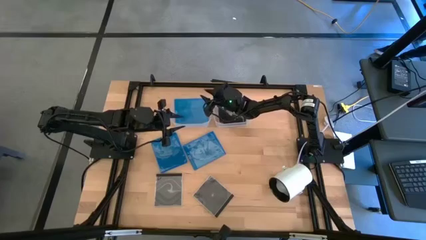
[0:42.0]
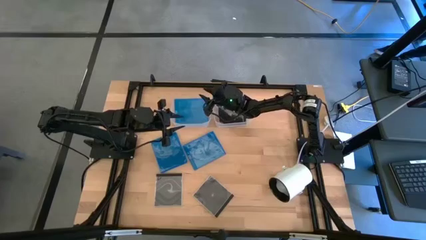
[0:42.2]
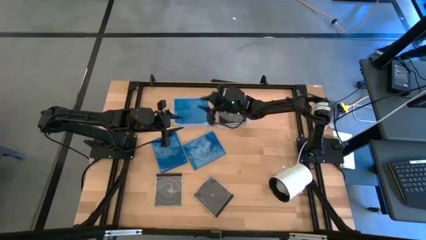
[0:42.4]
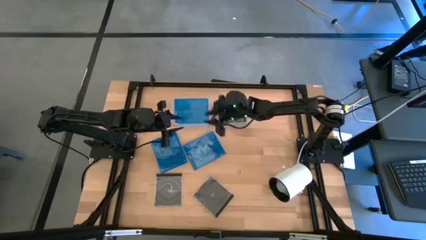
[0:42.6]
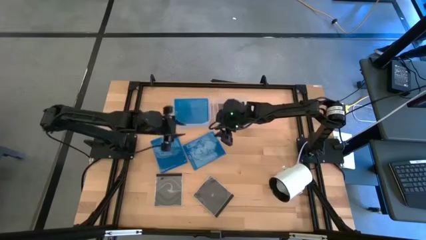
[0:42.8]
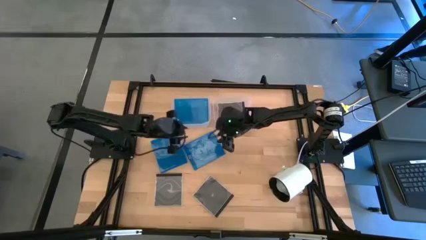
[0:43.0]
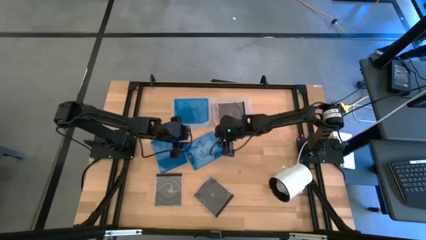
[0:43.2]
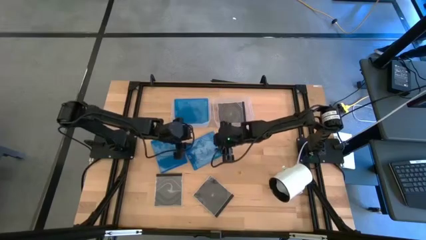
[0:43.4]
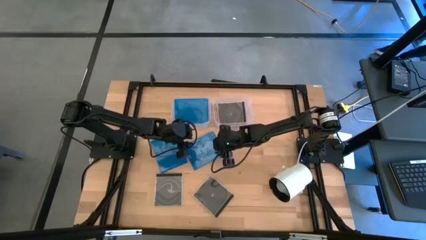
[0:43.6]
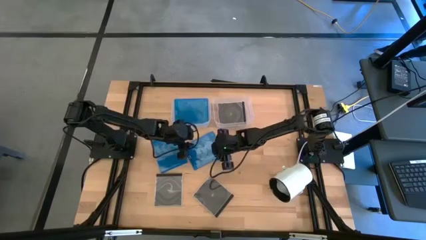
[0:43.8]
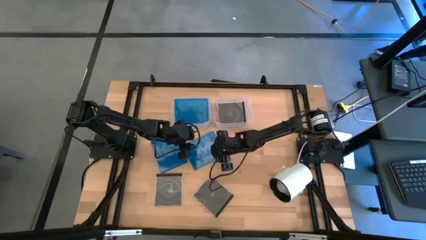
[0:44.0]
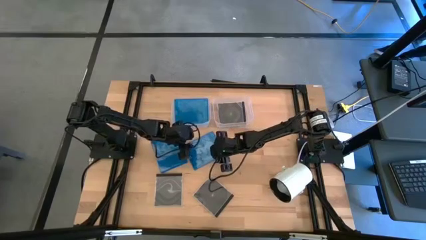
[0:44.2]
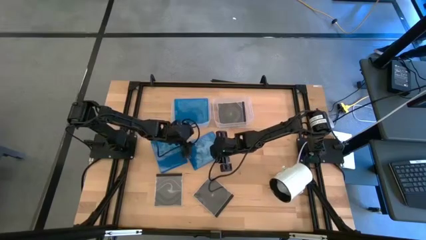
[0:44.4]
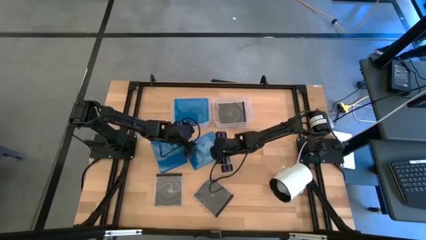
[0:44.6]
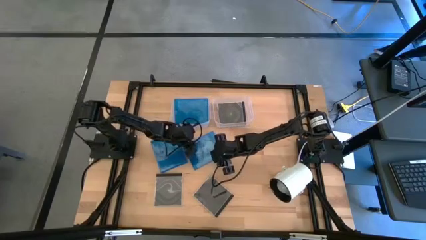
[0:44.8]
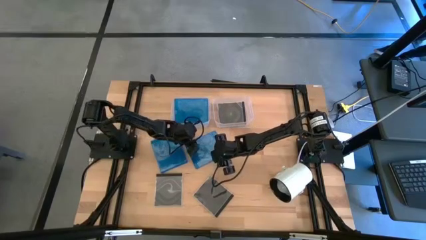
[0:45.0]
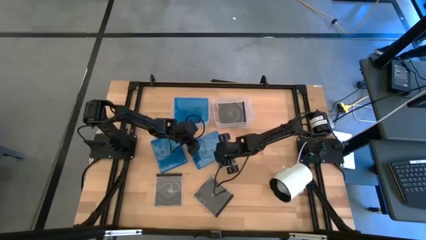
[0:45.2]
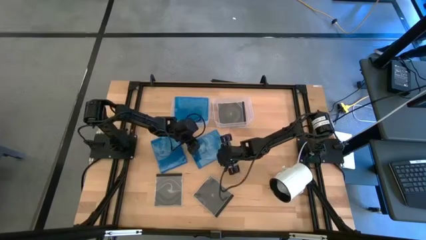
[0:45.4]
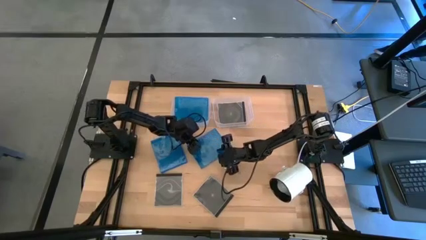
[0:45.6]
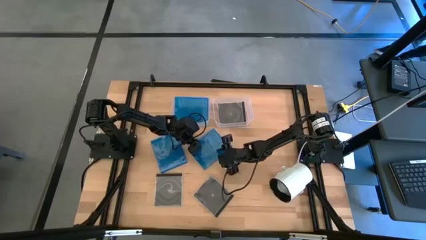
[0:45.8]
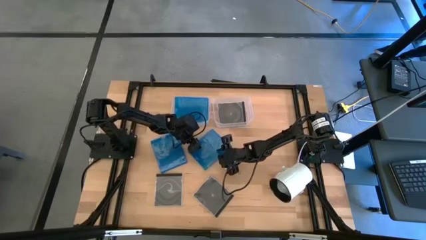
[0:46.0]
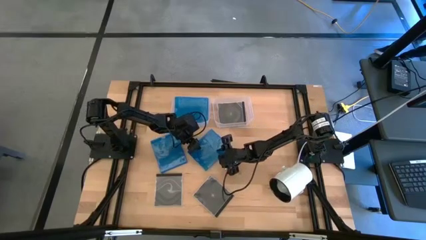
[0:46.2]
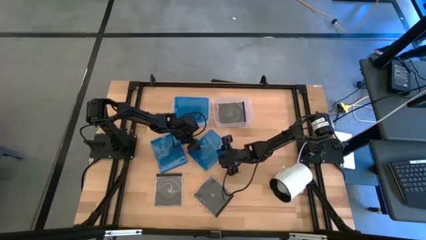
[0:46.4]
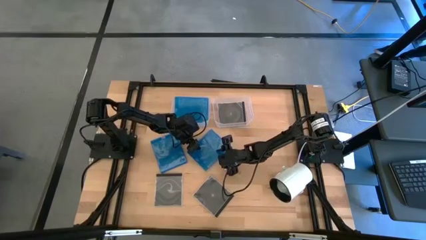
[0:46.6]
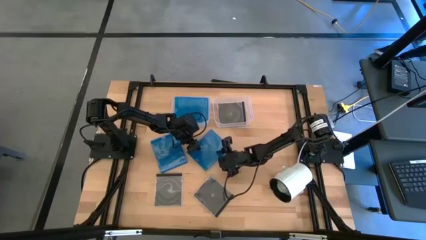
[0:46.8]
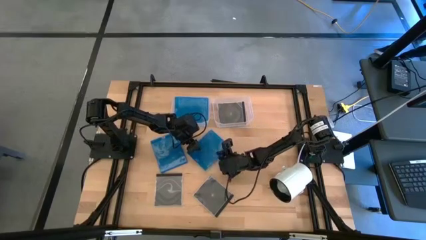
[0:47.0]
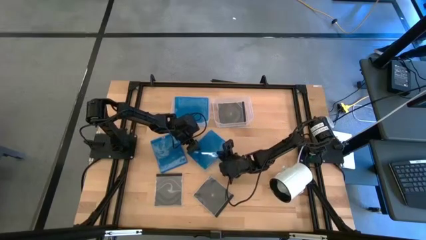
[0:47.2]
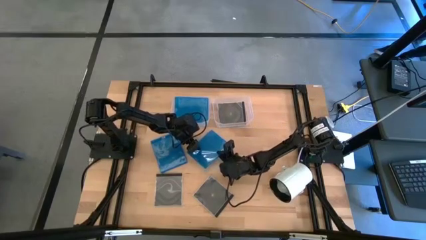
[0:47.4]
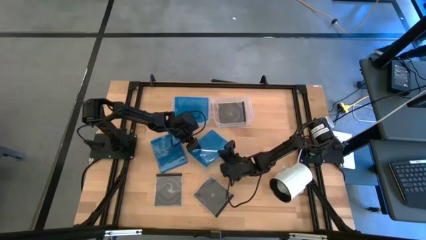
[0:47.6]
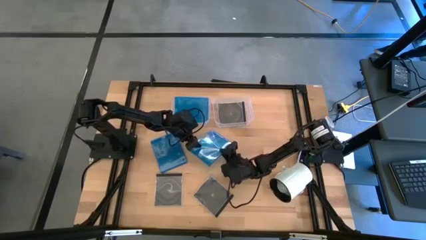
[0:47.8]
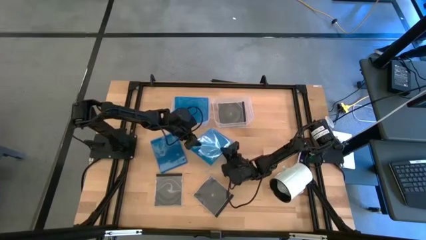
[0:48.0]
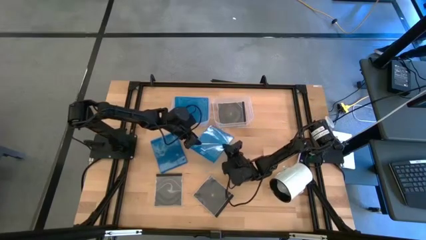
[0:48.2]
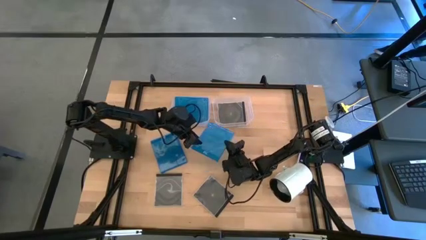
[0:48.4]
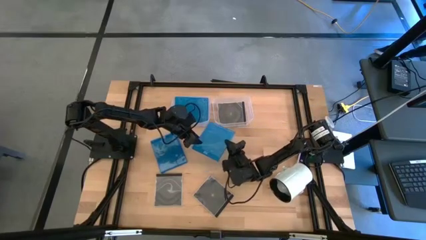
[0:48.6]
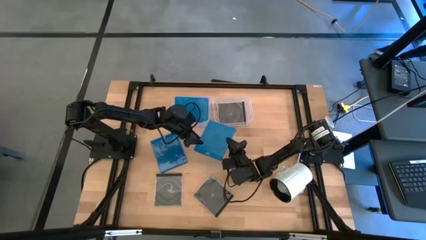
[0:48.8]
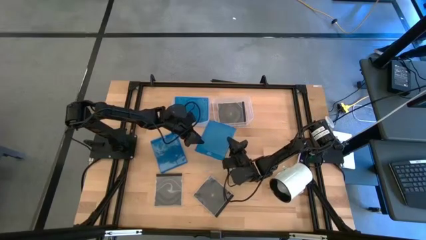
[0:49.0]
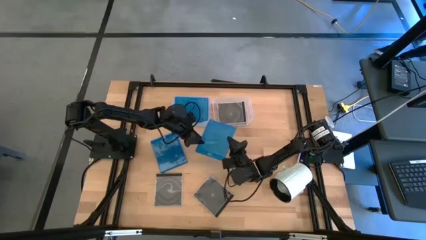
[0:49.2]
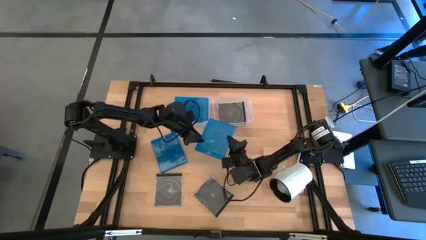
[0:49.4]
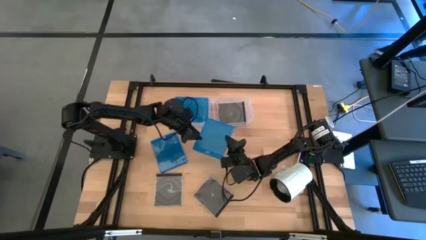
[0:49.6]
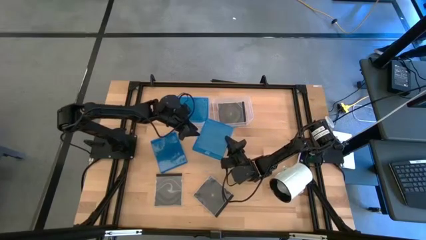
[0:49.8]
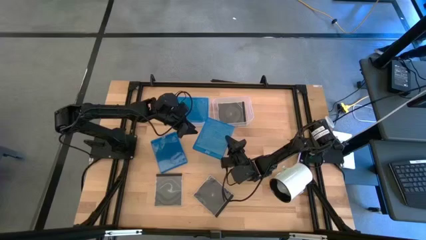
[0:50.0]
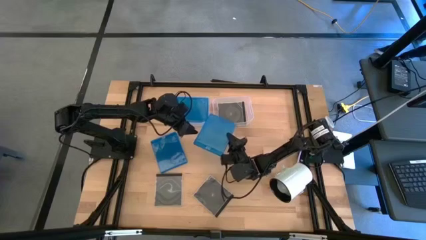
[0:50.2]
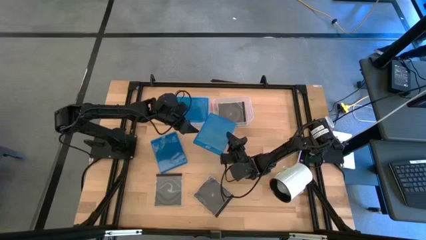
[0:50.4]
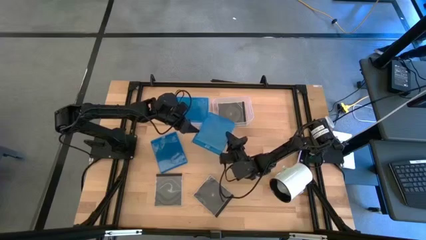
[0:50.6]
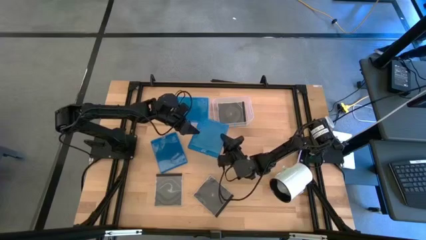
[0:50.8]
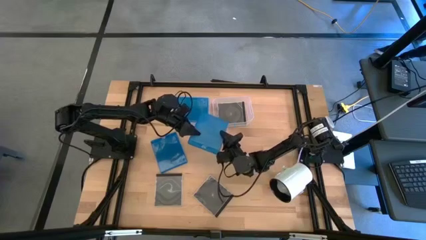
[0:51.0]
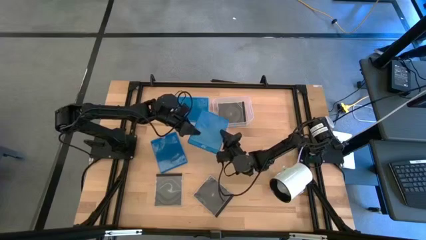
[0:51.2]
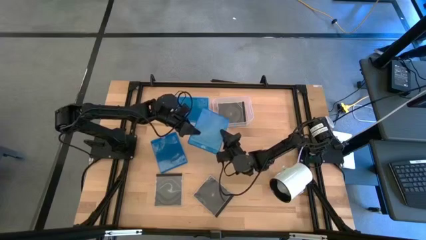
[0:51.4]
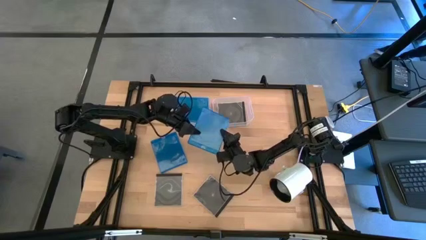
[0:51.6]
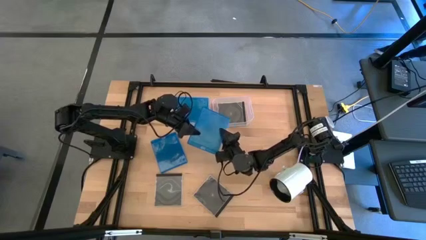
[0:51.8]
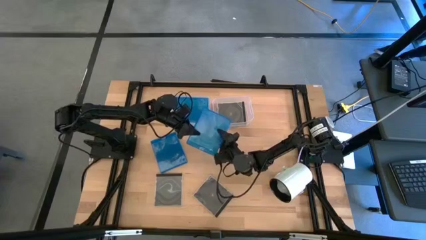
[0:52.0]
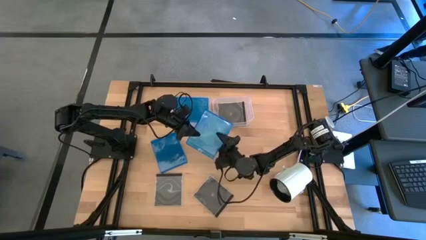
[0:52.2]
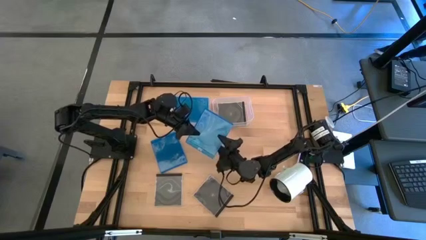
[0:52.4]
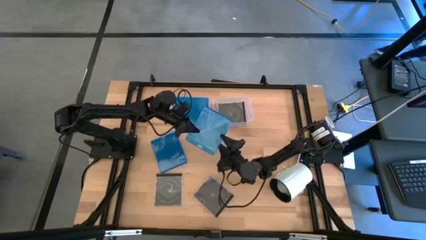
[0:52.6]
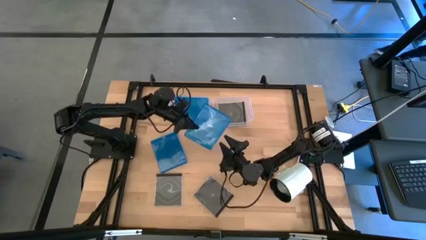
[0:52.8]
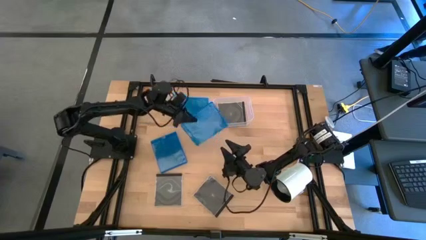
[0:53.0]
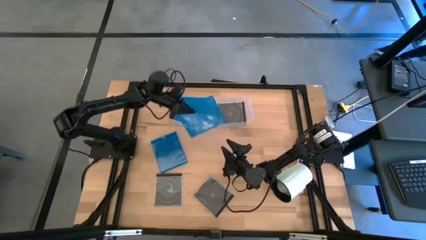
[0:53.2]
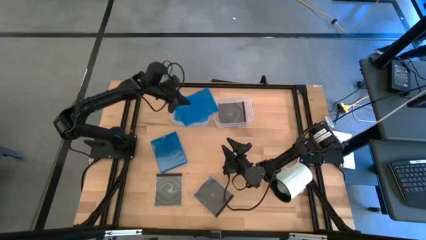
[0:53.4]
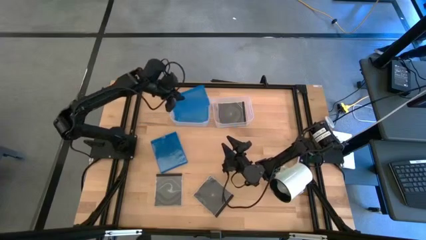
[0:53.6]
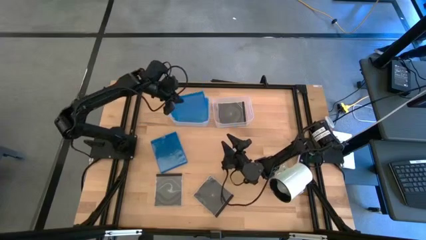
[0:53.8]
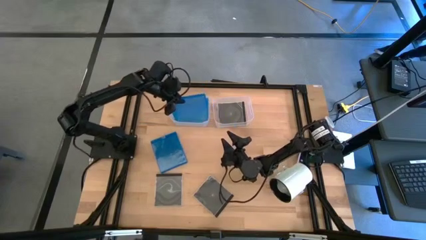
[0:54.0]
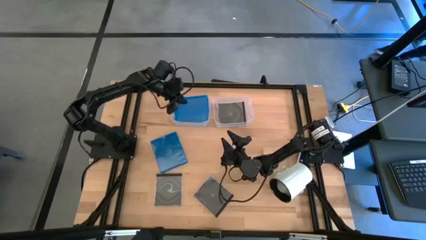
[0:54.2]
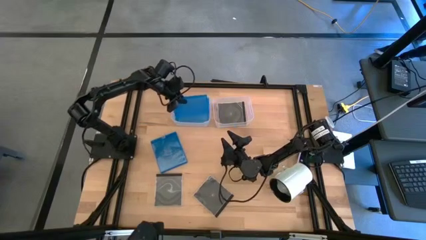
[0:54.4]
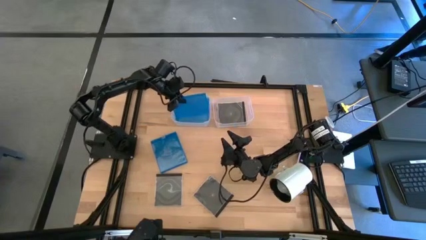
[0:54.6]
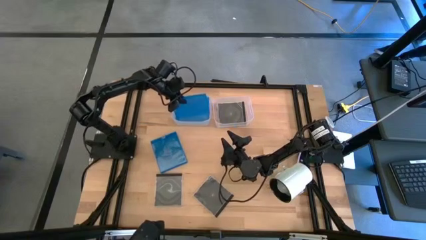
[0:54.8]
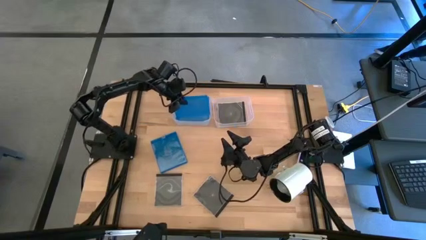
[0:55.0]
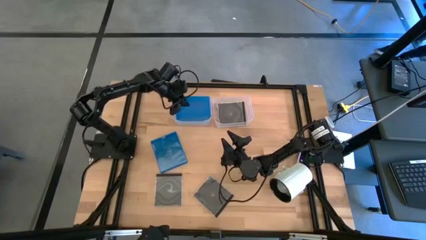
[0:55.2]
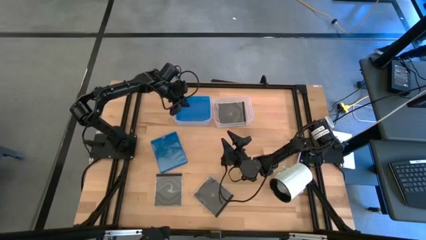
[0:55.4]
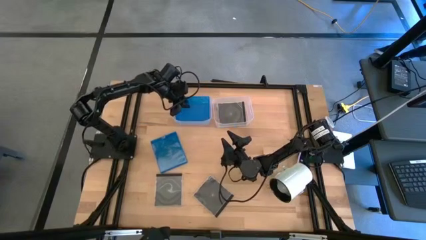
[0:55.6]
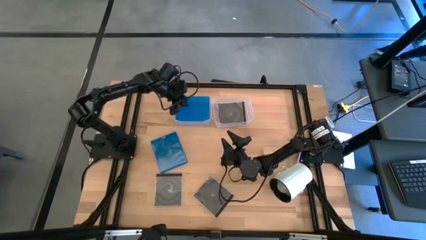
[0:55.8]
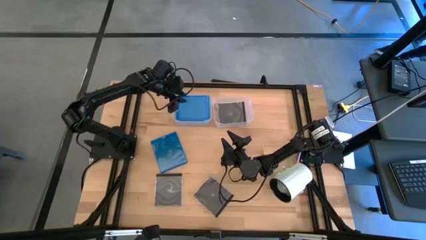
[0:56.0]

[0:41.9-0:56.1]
Task: Pick & place jewel cases by type
Put the right blue CD case into the left transparent bin
